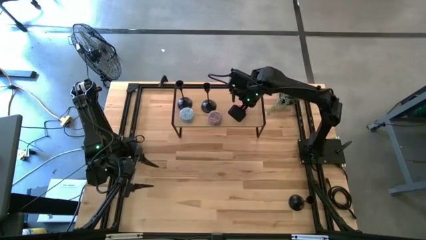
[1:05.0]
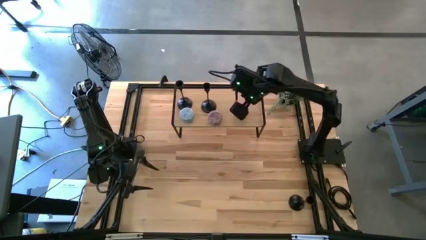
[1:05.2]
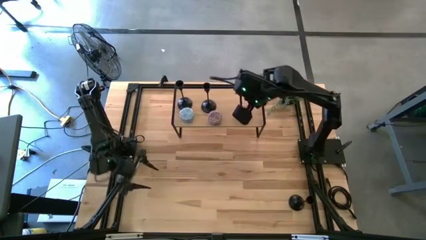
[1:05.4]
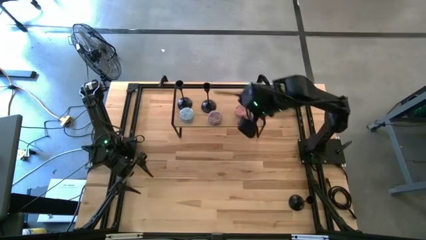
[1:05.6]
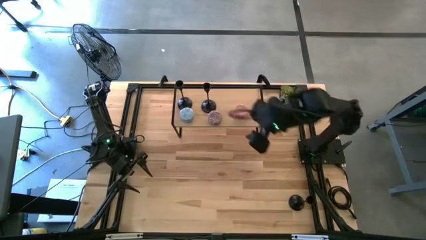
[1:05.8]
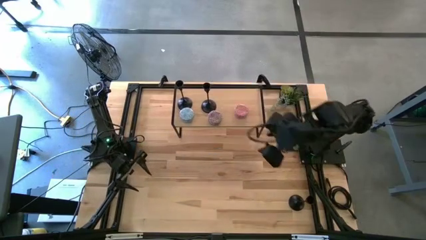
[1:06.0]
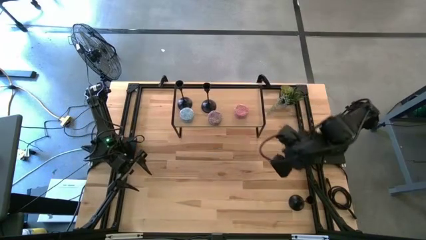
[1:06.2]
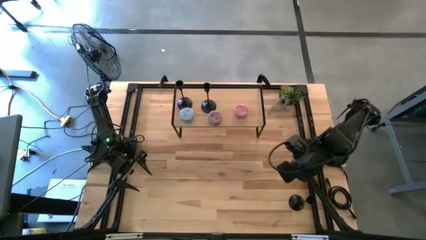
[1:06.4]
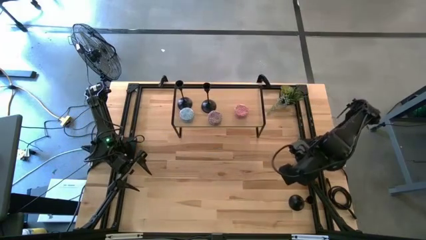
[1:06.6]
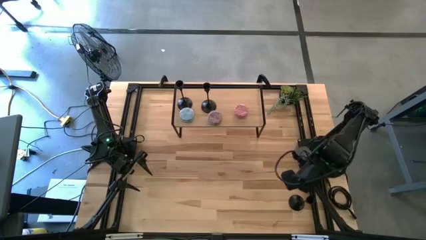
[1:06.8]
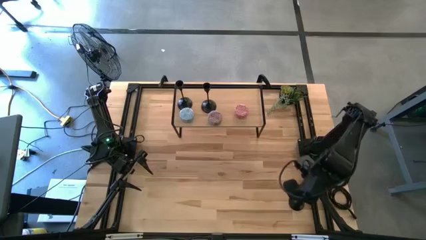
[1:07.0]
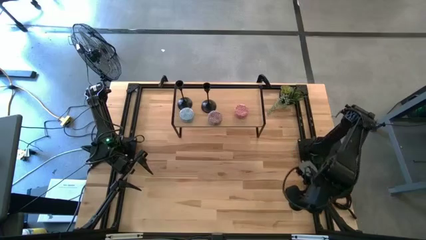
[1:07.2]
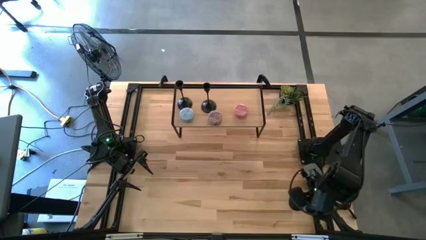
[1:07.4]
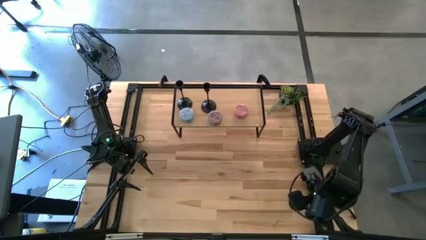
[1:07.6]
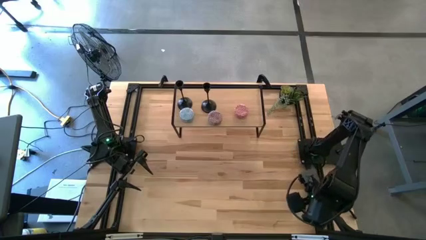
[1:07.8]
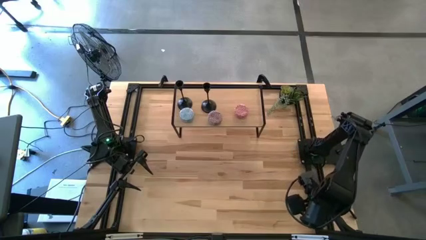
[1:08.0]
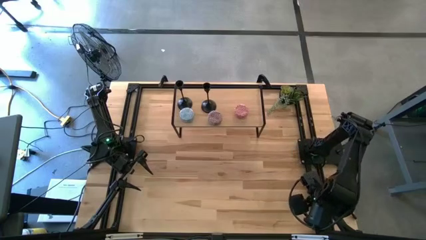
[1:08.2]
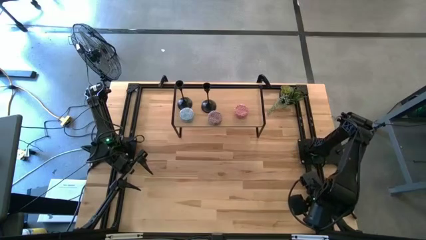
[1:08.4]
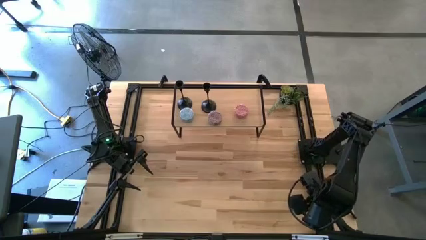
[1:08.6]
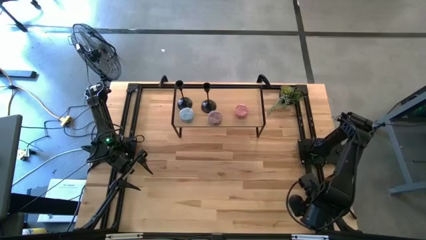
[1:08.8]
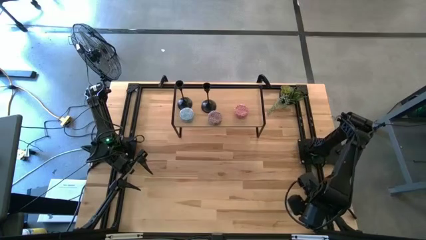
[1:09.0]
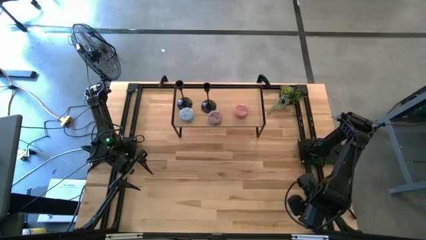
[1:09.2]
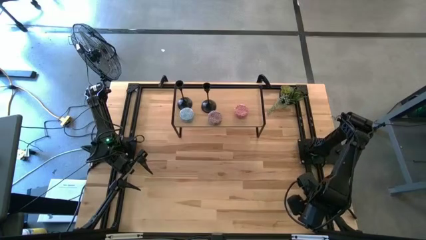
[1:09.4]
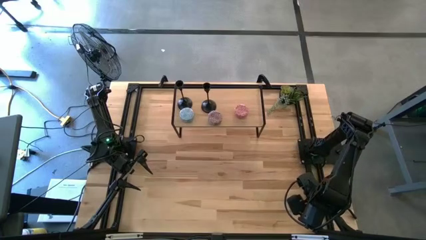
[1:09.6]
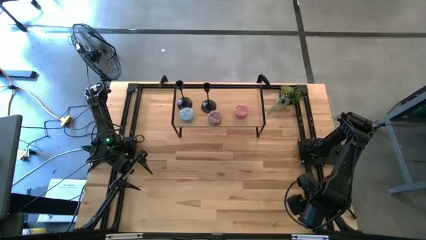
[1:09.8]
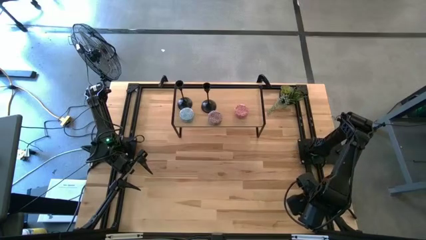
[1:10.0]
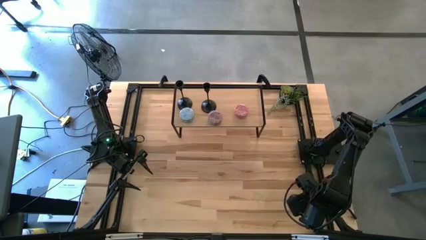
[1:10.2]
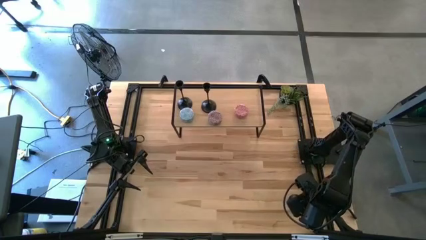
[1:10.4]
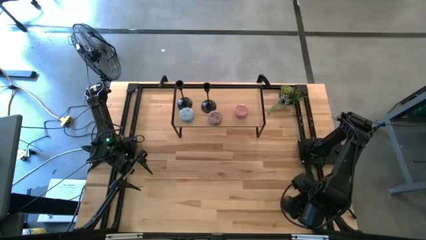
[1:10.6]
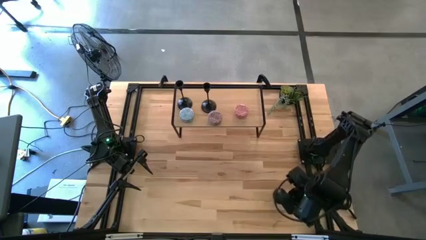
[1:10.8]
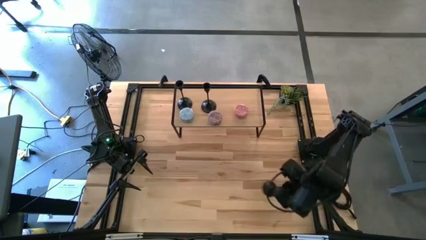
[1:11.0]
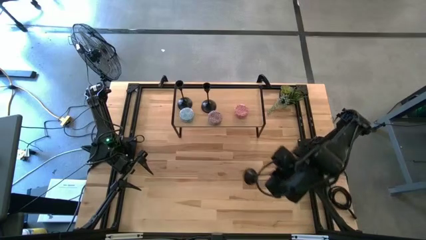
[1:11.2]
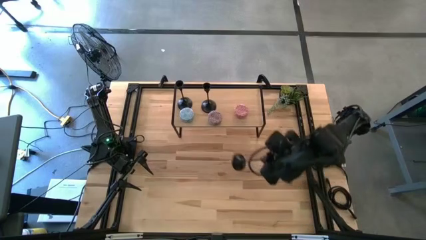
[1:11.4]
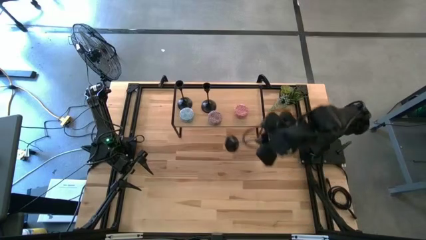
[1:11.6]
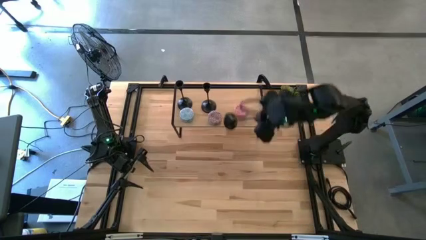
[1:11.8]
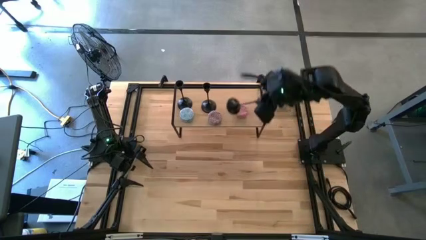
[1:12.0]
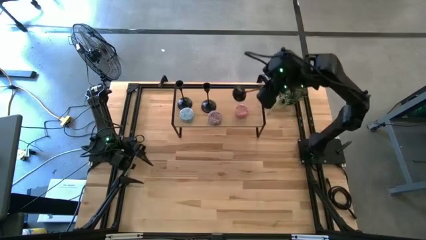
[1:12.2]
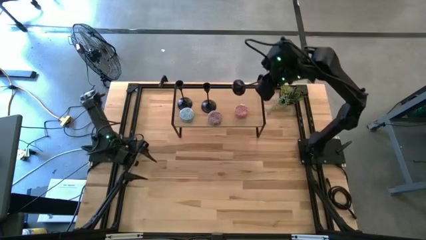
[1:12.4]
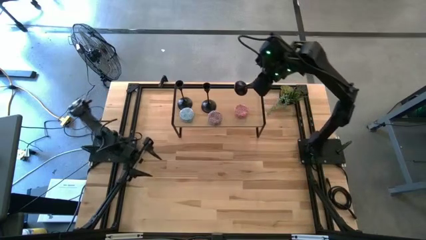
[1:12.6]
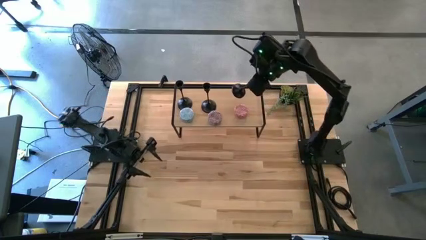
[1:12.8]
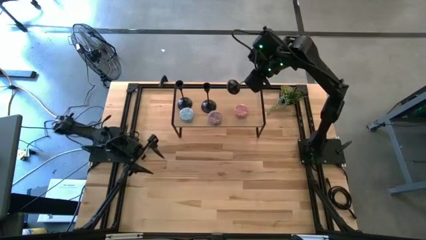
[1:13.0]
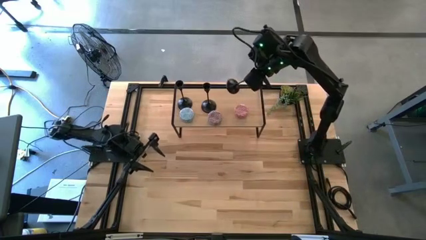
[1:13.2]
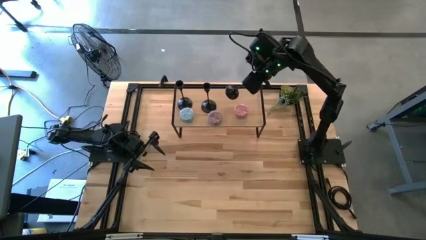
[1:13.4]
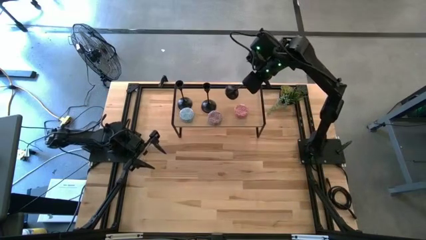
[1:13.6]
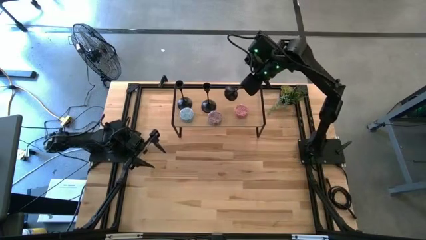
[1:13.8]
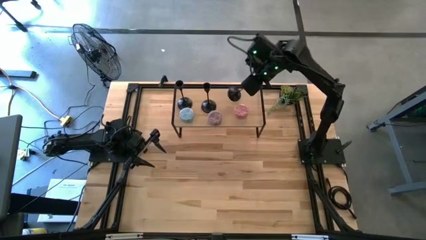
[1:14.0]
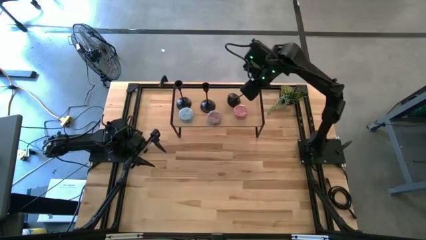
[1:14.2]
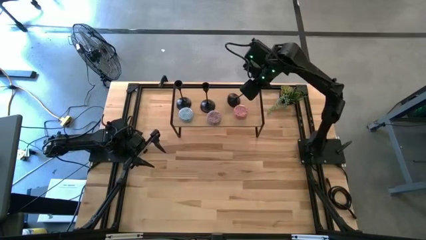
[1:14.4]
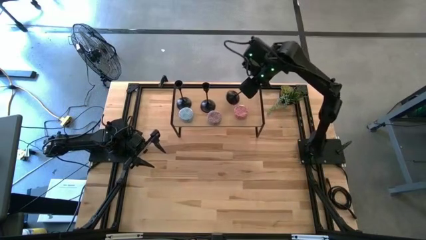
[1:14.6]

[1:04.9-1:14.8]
Task: Pick & Place candle stick holders
Put the black candle holder on the shelf

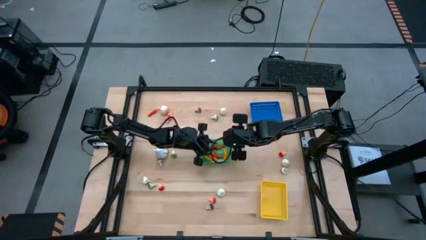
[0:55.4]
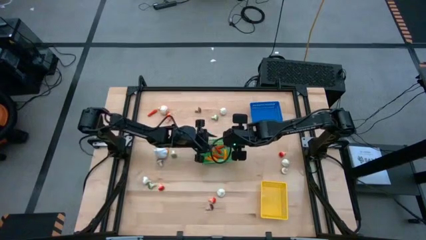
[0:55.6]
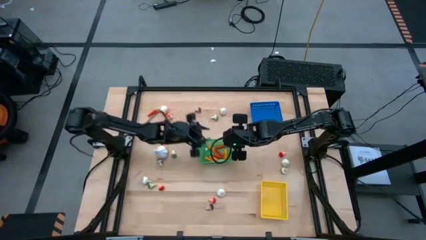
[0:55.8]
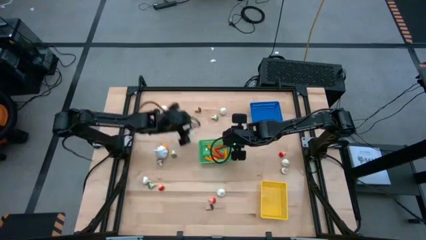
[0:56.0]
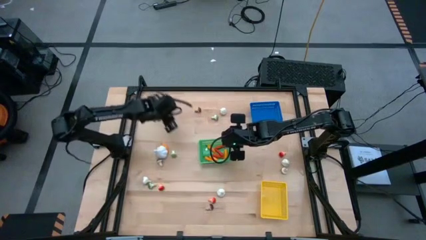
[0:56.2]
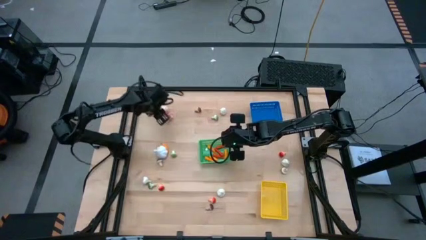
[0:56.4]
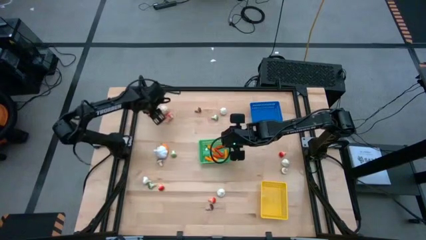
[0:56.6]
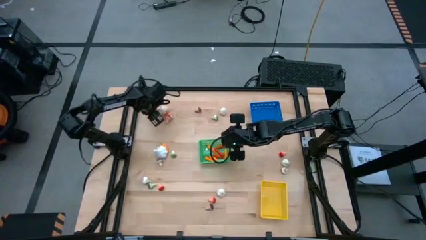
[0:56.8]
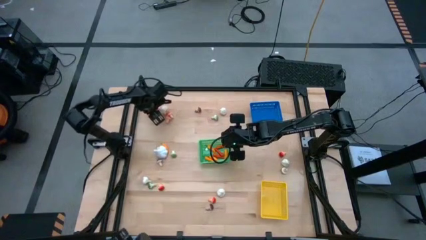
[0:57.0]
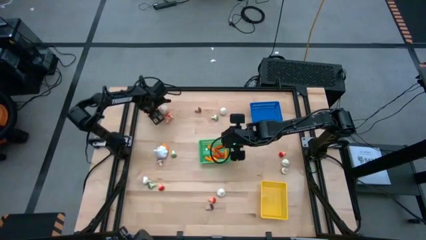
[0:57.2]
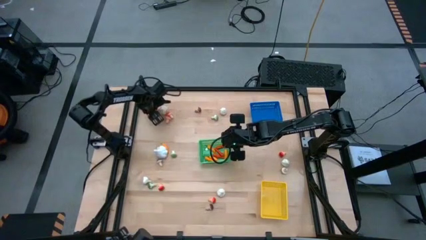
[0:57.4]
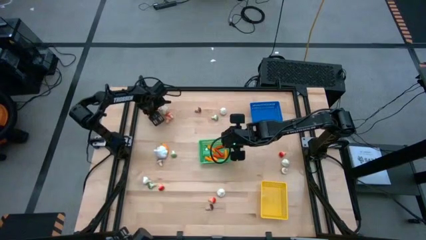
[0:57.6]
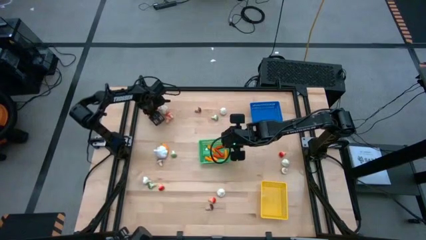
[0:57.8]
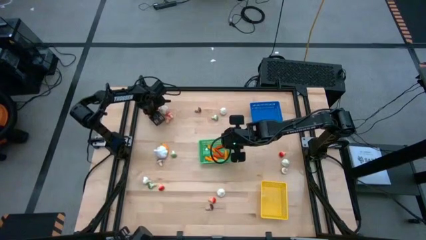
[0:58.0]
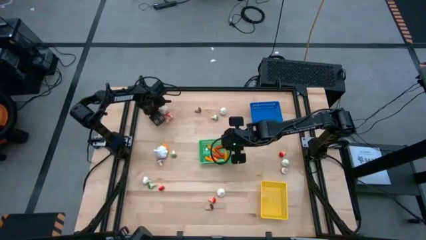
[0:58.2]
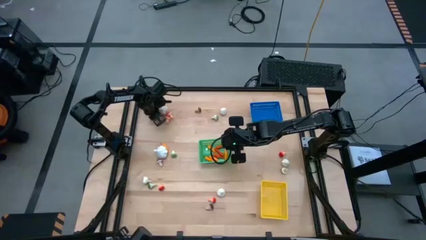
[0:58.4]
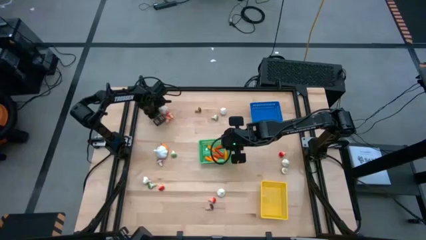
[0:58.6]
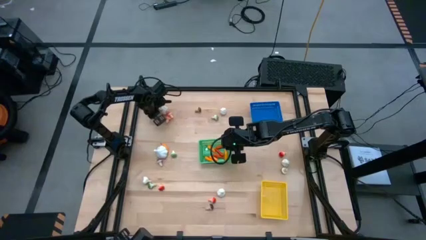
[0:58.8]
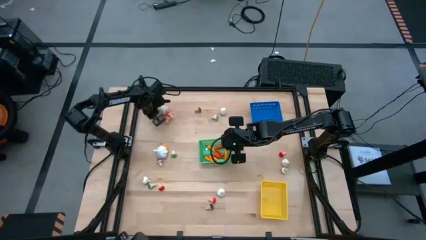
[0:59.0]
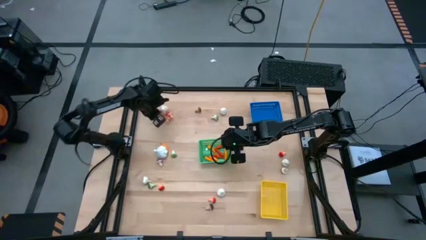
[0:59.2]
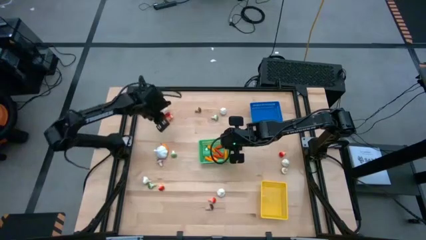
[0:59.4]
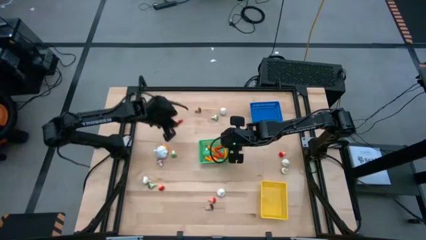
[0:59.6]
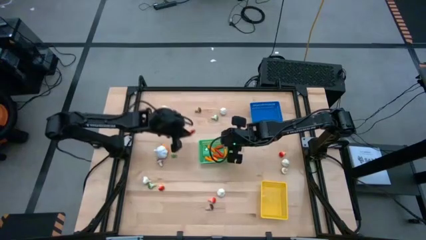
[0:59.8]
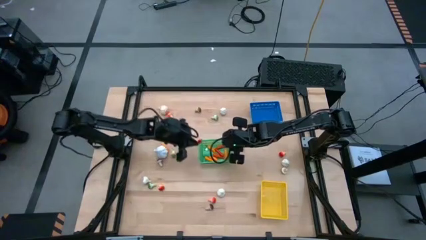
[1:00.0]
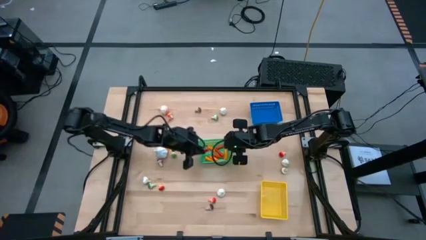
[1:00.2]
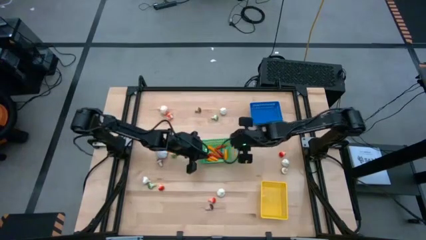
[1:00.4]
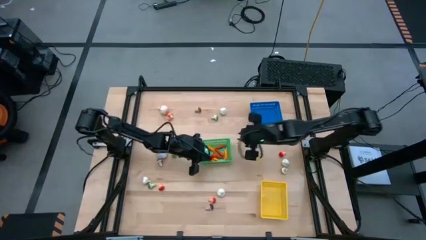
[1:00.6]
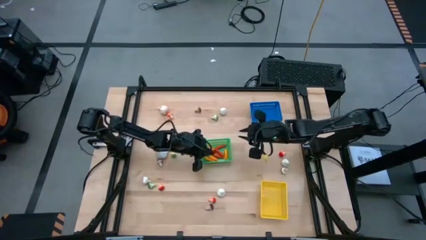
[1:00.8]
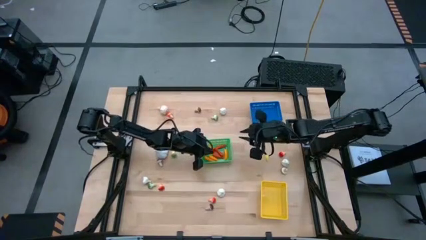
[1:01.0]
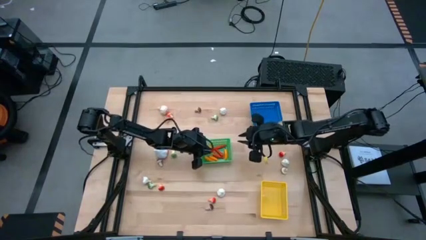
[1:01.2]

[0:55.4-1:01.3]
Task: Sort produce into baskets
Put the orange chili pepper into the green bin
